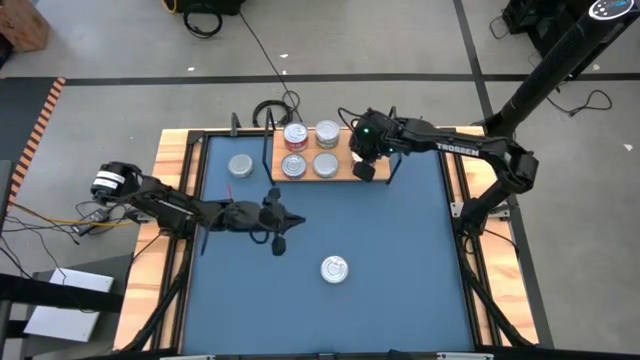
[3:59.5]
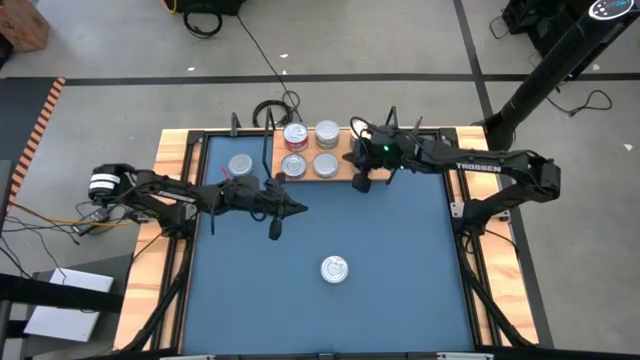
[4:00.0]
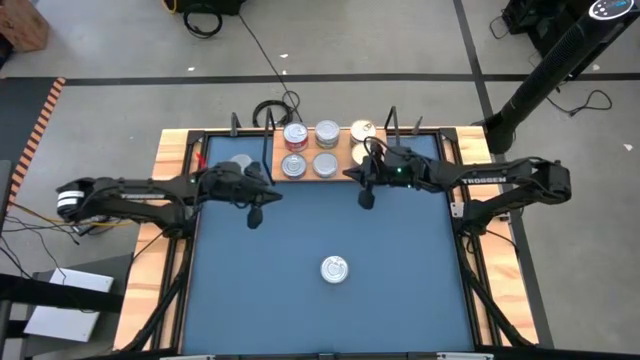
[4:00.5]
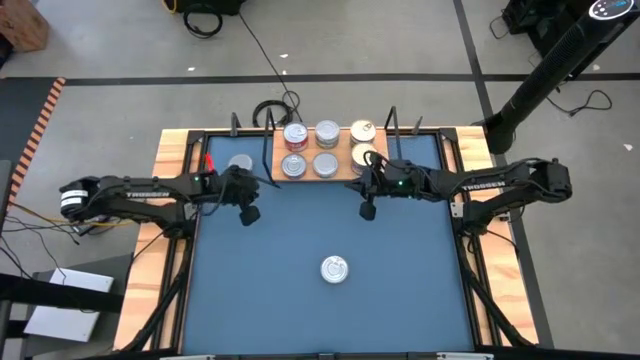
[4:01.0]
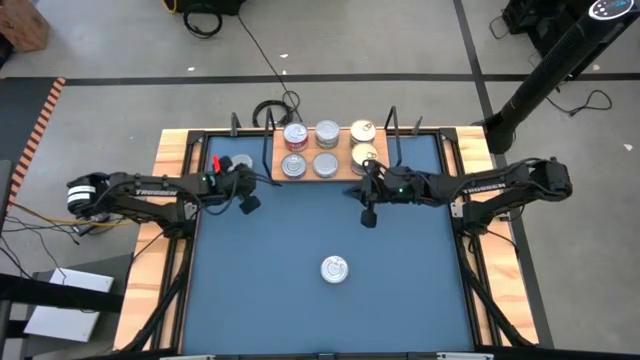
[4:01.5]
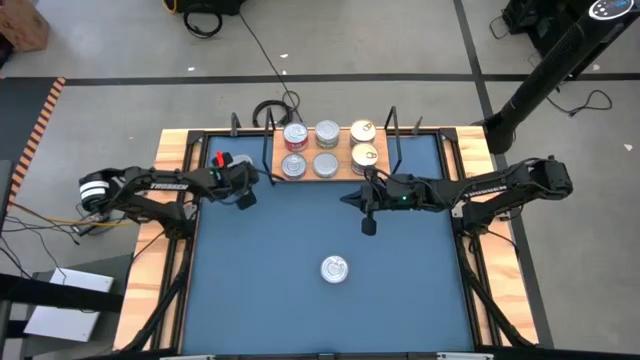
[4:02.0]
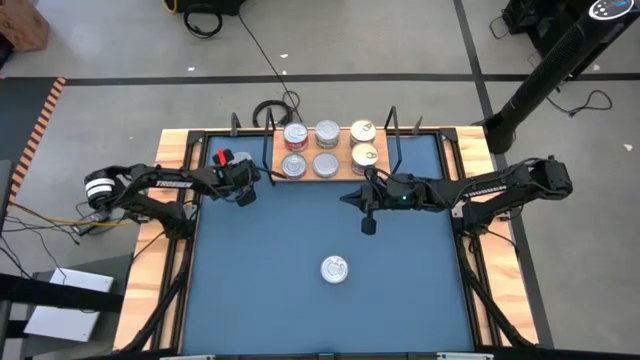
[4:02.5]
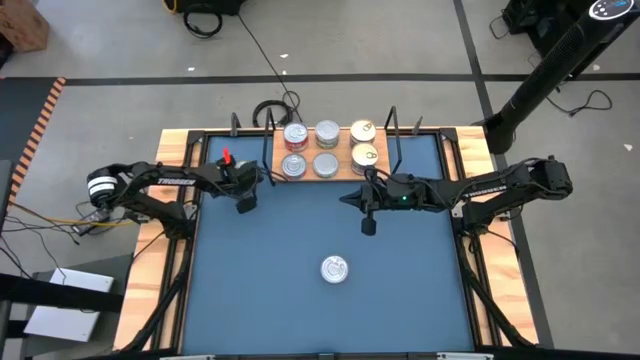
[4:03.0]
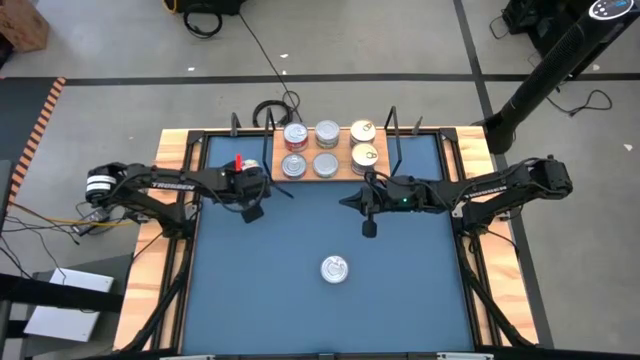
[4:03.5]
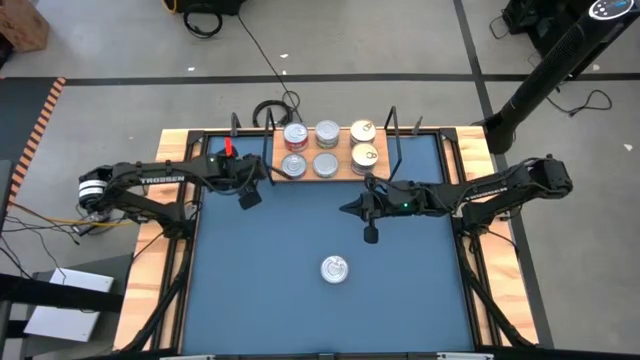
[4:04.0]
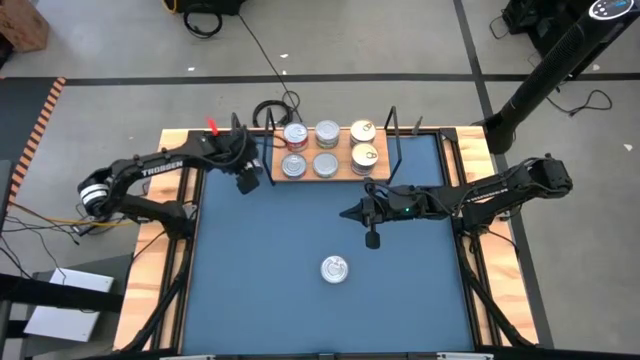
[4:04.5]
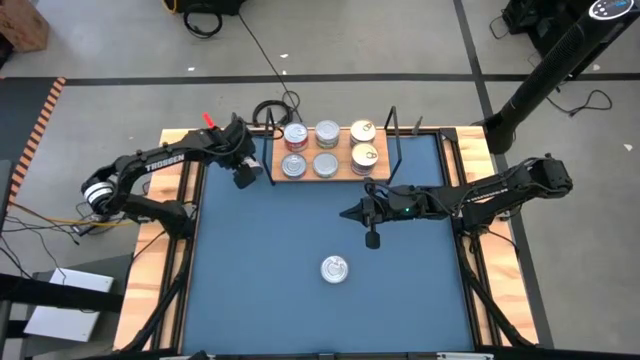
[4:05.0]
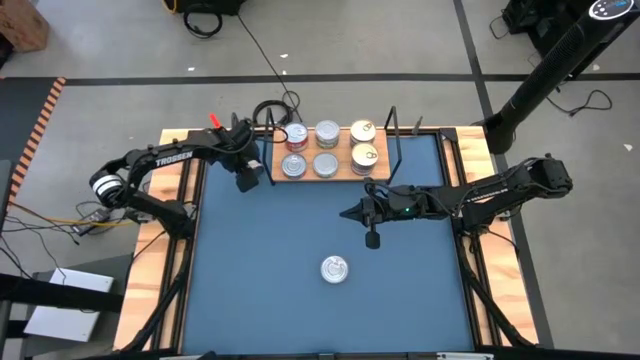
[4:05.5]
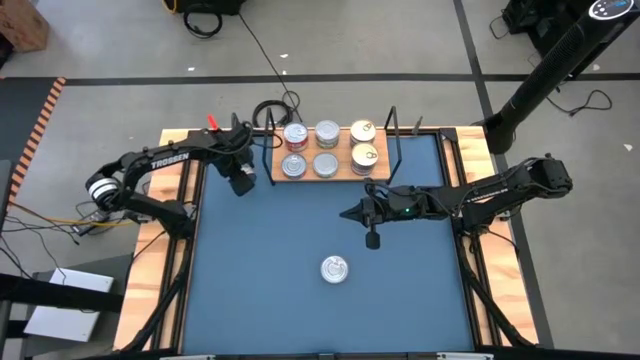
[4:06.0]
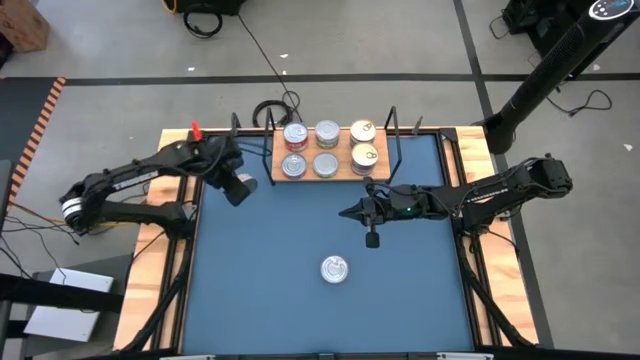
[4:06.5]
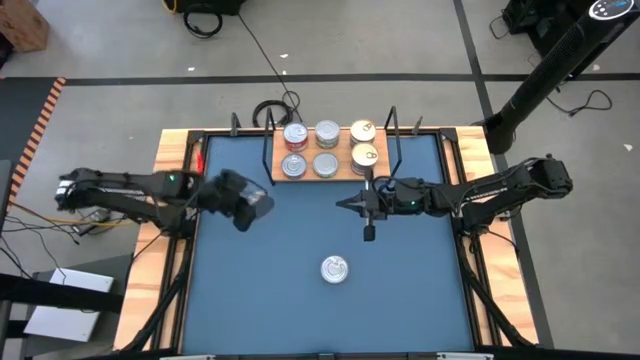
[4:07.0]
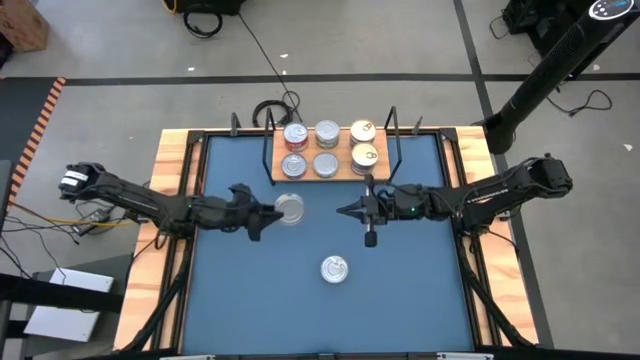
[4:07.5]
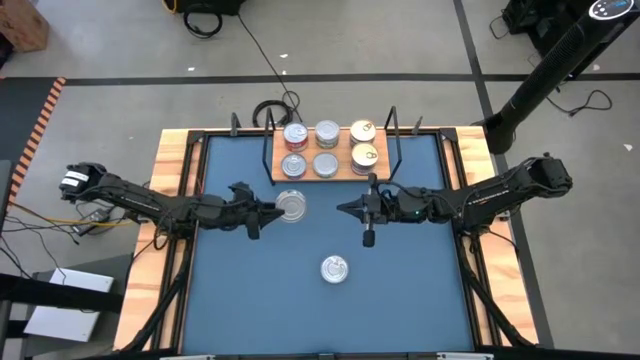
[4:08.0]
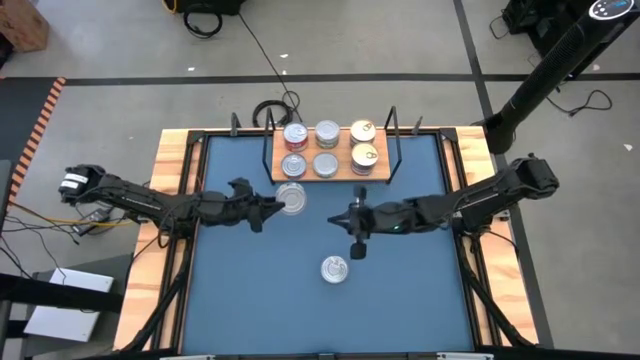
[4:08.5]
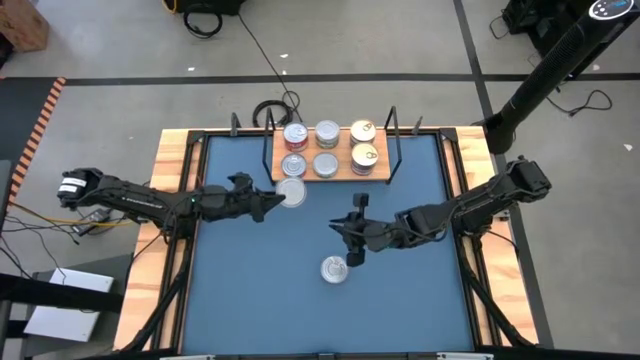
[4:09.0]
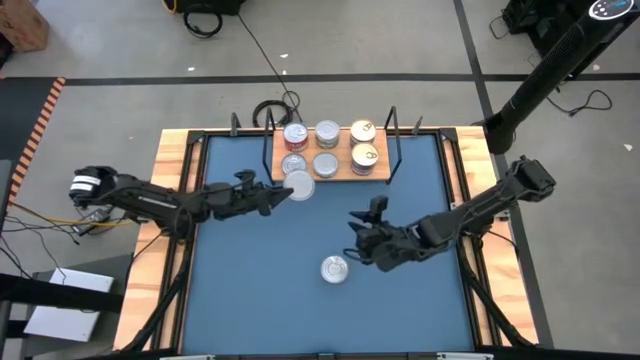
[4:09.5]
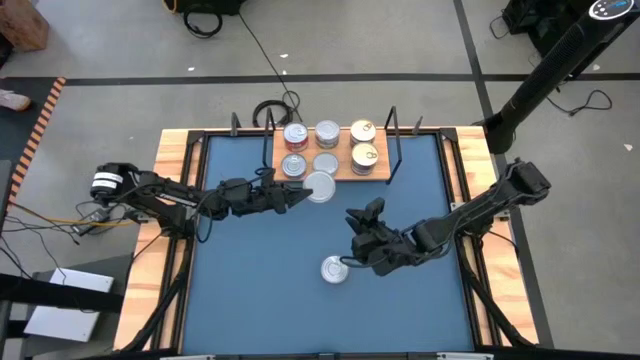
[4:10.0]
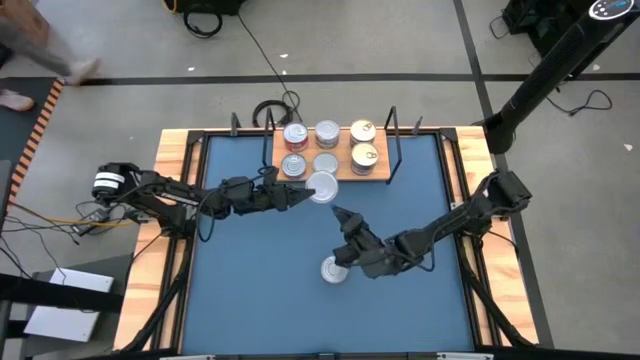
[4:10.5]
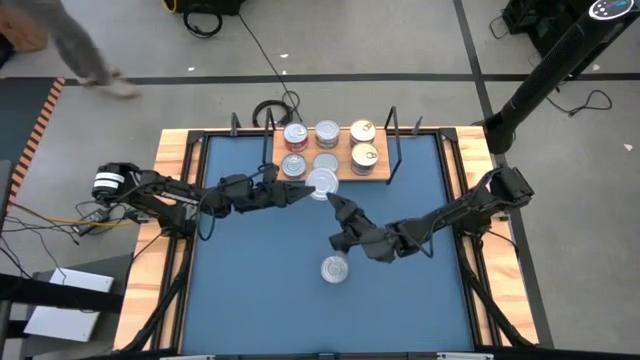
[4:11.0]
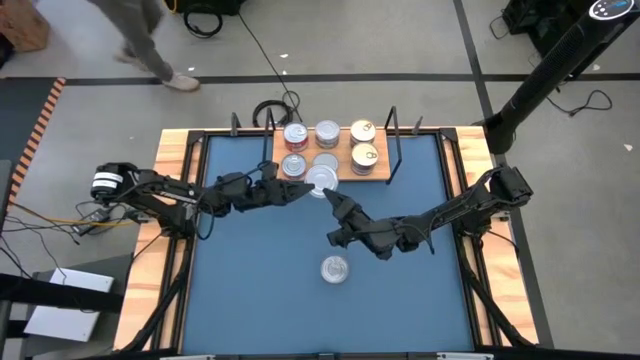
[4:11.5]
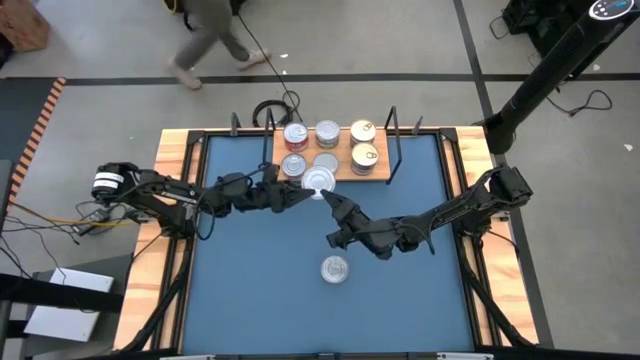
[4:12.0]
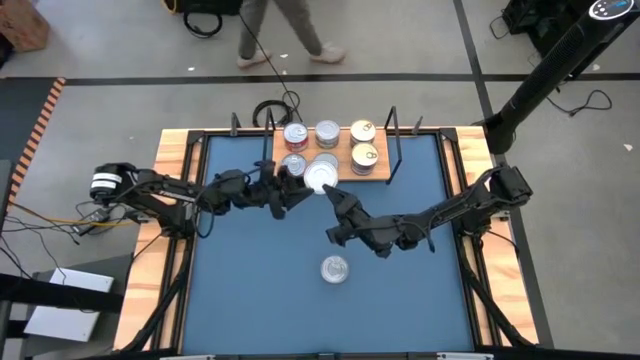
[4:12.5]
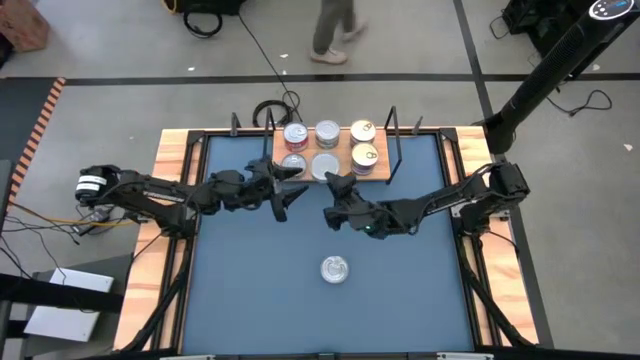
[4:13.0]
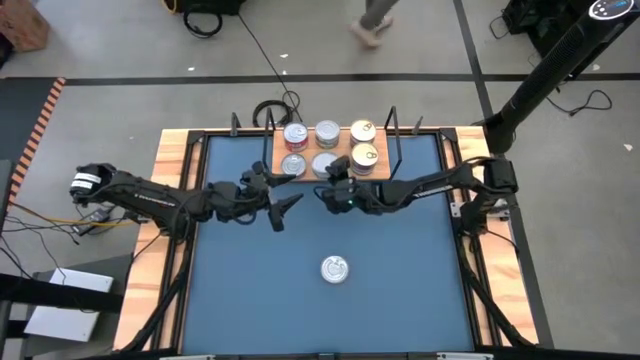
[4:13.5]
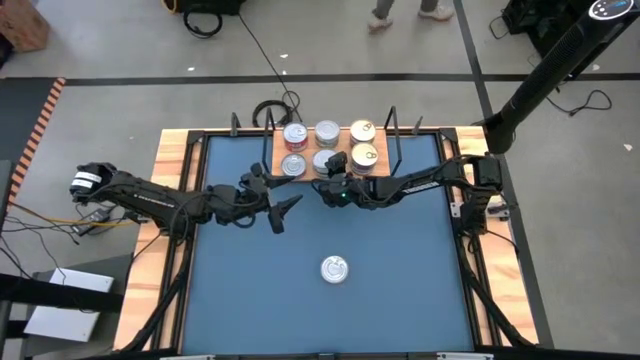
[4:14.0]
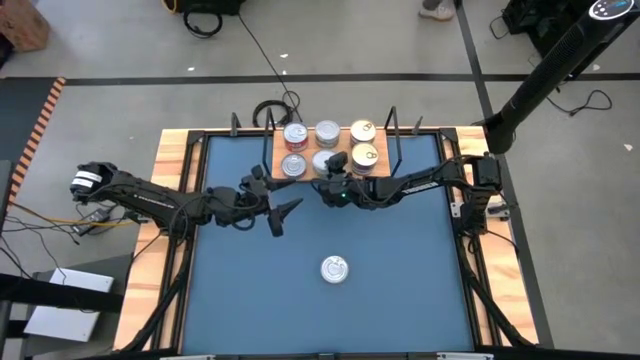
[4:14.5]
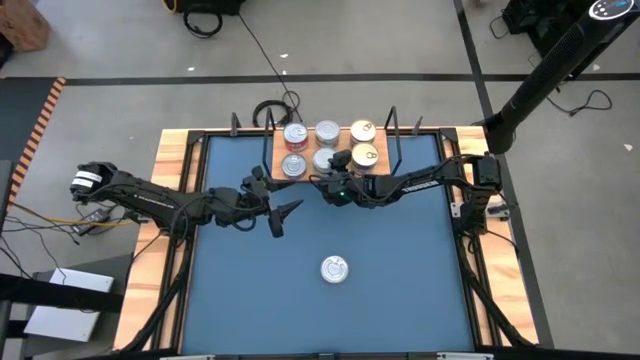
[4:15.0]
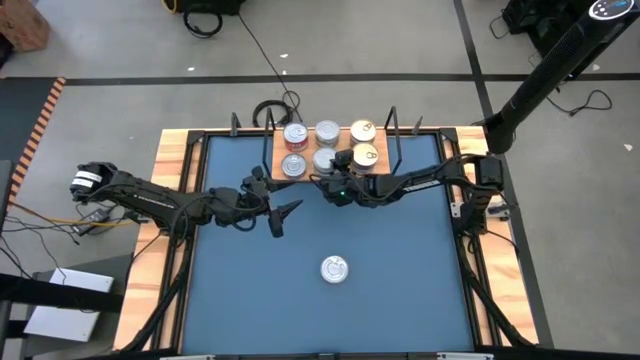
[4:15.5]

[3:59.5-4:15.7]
Task: Stack canned seafood by type on shelf
Stack the green tuna can on top of the other green tuna can on the shelf
